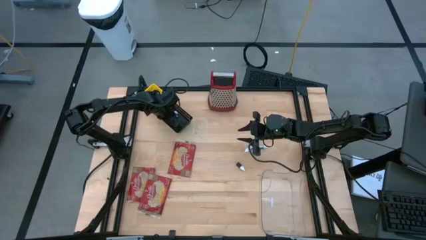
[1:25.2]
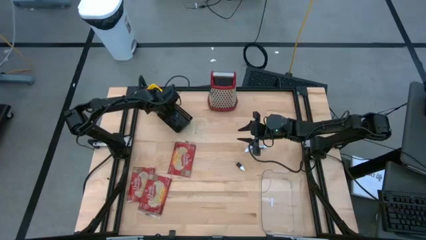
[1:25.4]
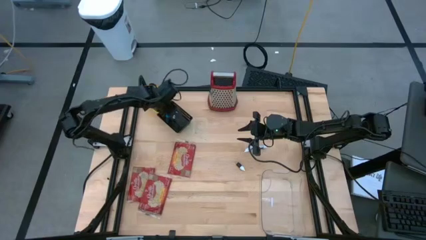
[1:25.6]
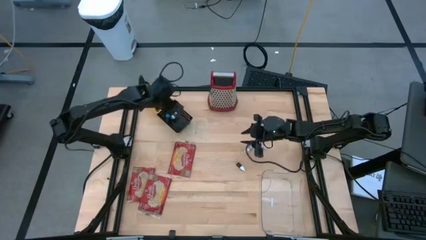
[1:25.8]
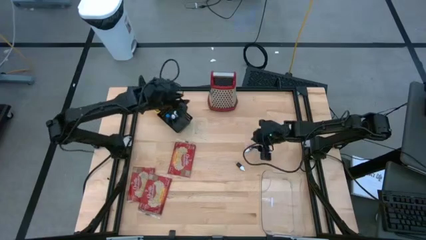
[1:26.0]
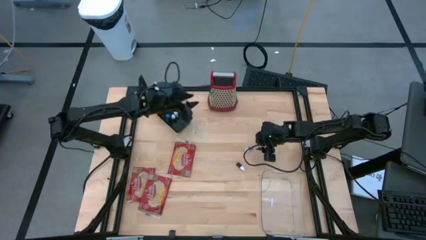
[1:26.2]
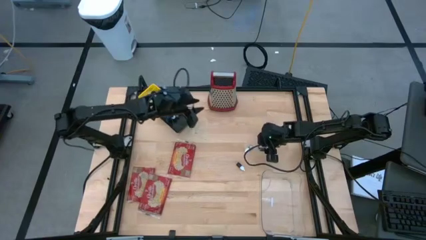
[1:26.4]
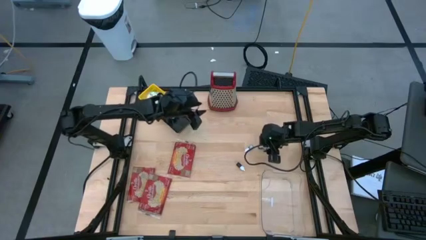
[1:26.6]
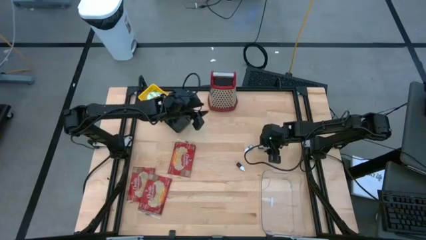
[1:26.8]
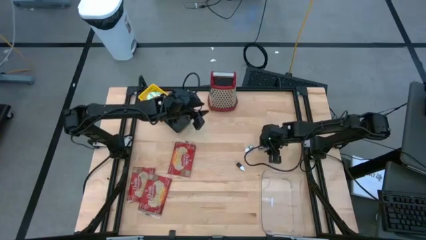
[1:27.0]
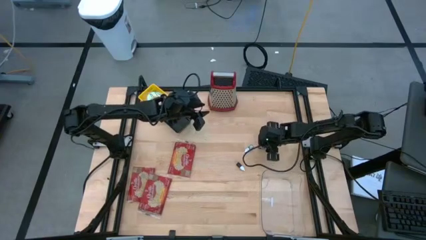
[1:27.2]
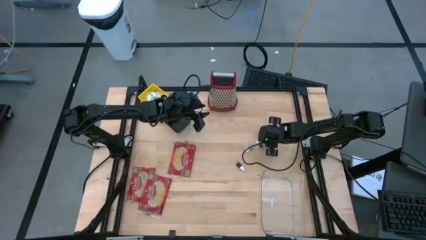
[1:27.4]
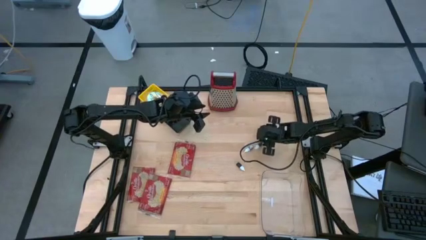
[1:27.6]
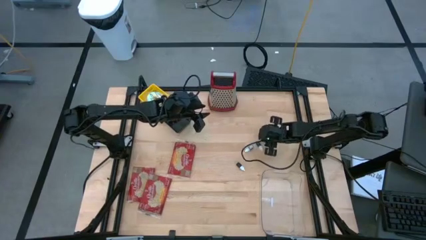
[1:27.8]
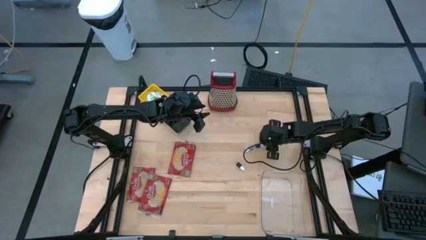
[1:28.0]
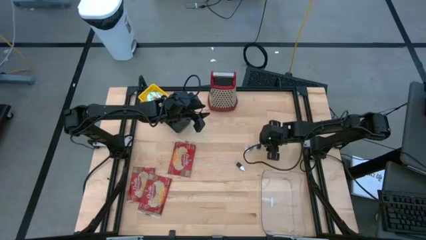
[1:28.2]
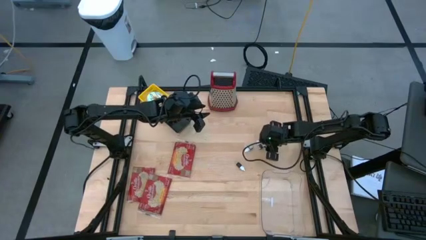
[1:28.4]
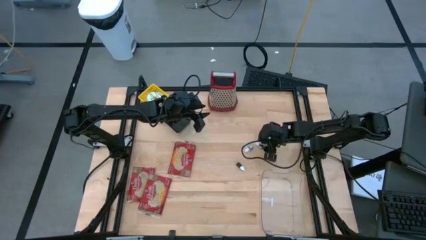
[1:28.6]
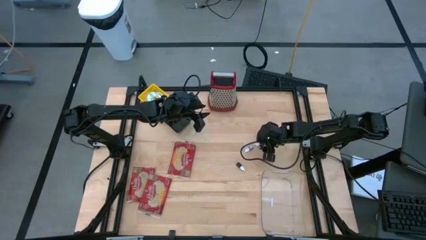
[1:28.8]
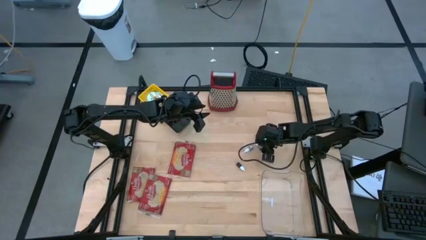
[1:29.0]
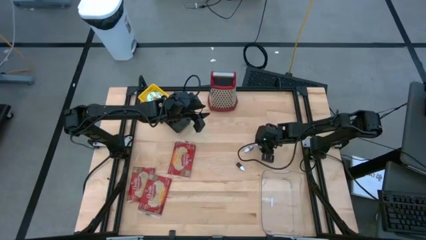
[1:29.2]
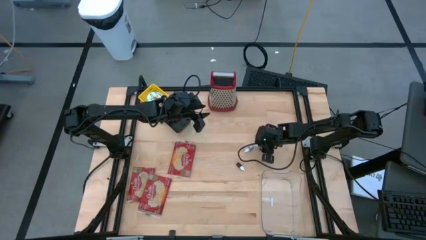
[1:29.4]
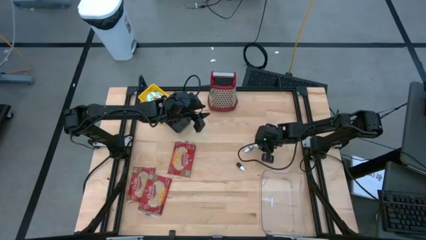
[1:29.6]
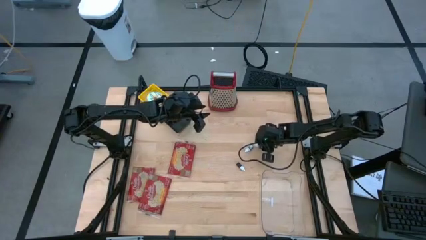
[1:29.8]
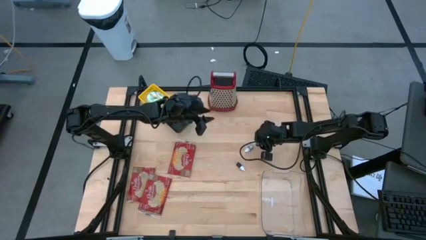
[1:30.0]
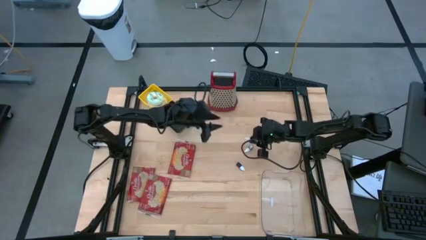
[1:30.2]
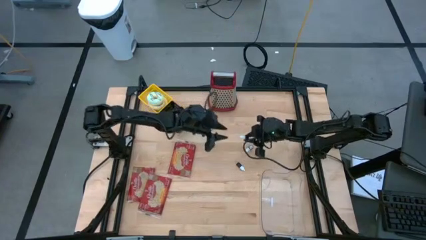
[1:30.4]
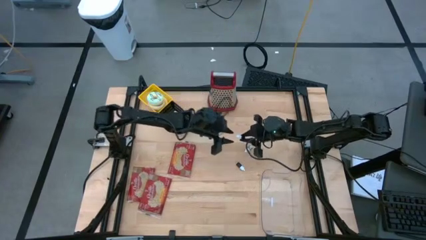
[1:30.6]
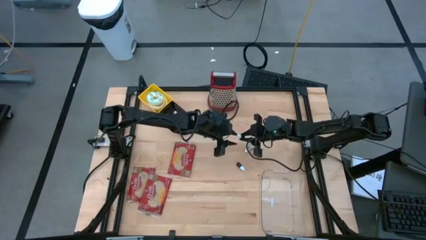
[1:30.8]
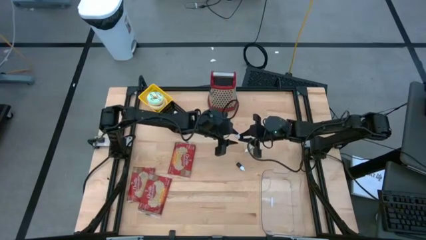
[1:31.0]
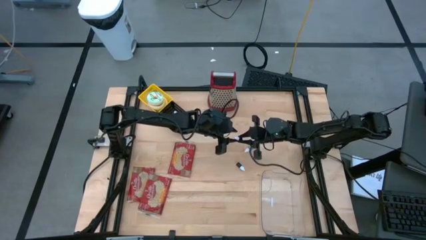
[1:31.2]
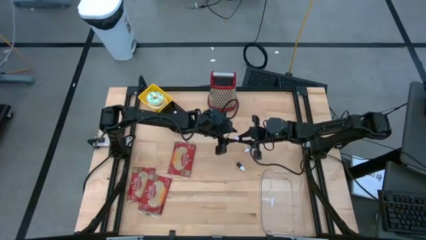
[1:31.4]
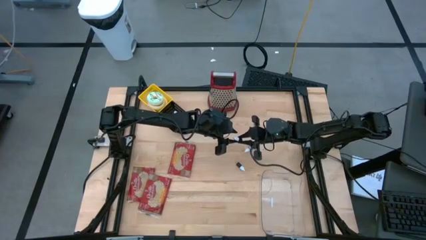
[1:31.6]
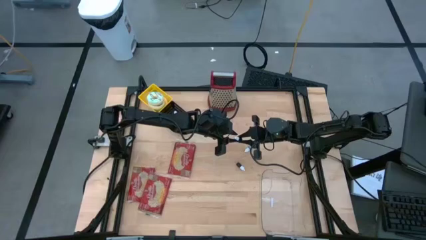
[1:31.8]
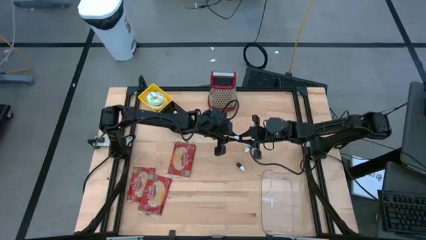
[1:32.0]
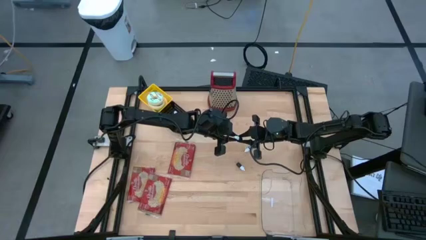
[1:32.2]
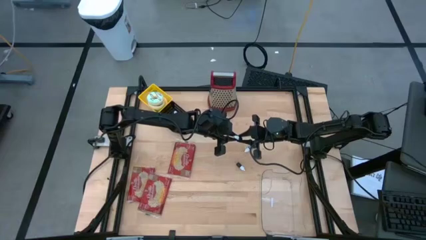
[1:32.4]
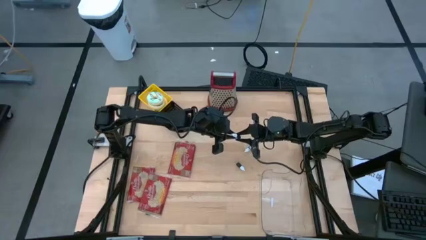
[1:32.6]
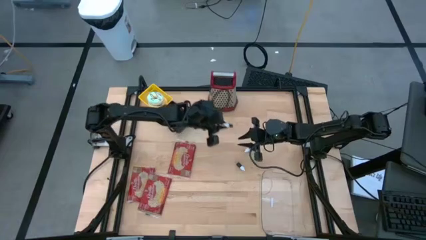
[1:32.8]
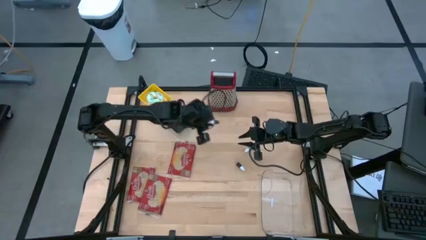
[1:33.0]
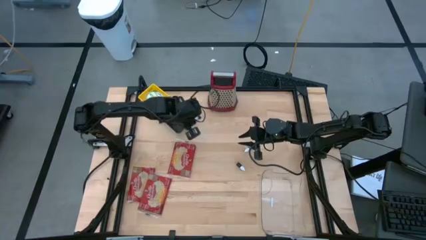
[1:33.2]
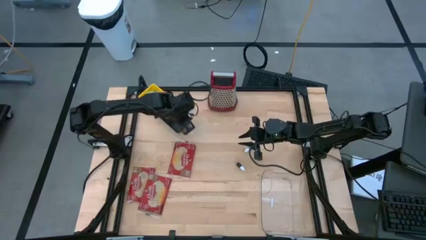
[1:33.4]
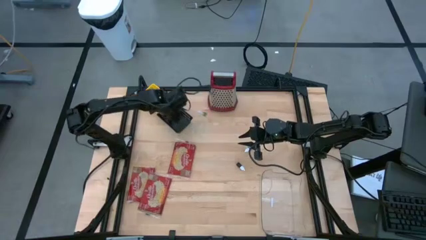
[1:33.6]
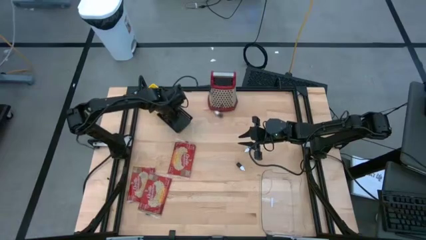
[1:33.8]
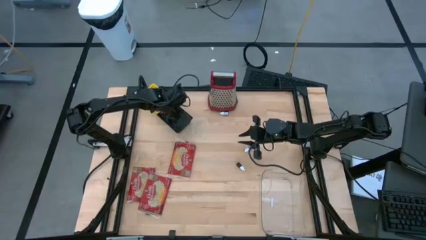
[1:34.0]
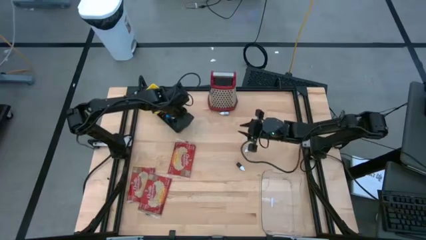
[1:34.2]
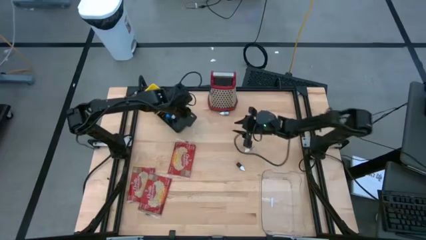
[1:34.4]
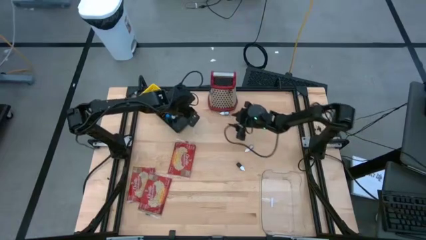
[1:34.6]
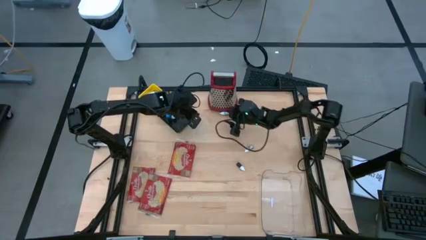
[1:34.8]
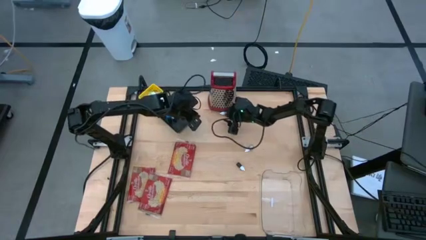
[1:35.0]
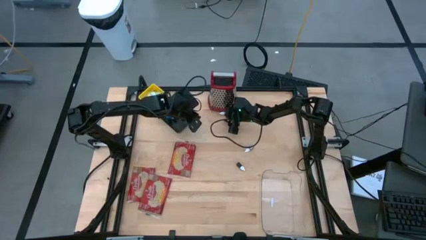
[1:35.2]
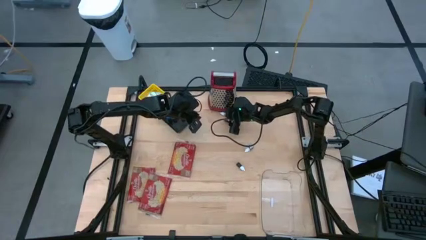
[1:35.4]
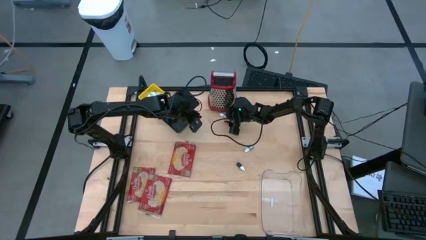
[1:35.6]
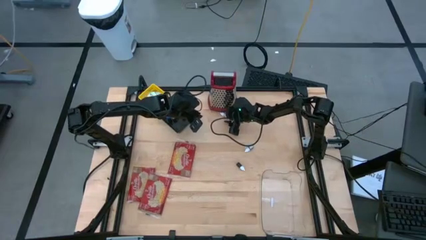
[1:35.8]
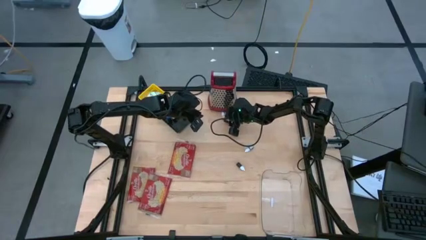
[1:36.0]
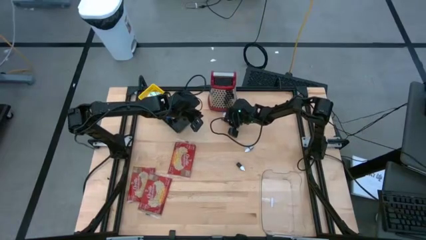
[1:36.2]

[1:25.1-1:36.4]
Put the top green food coloring bottle into the black bin

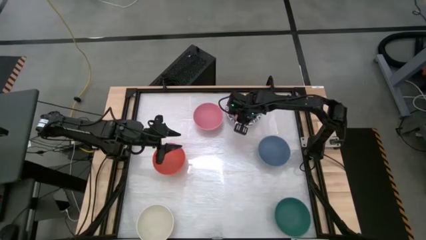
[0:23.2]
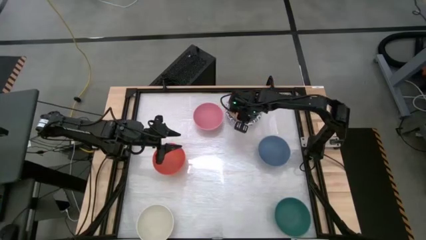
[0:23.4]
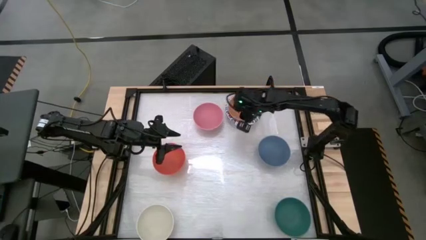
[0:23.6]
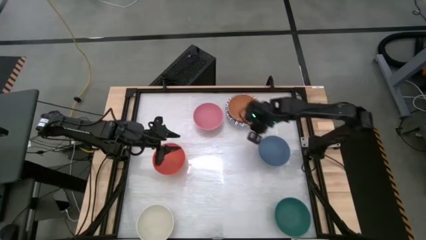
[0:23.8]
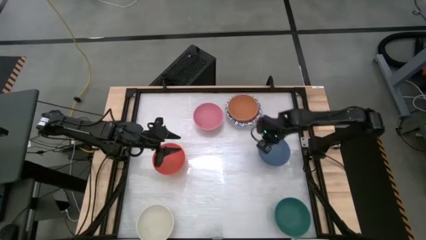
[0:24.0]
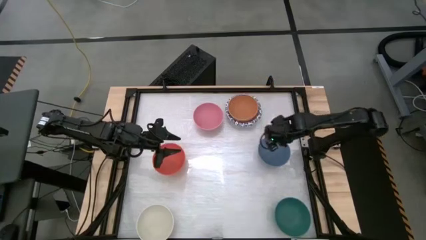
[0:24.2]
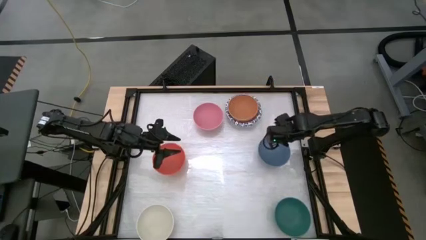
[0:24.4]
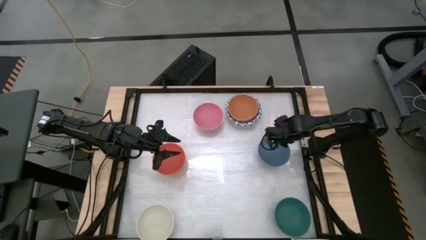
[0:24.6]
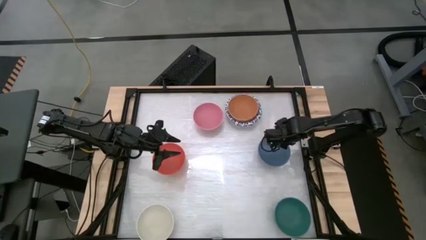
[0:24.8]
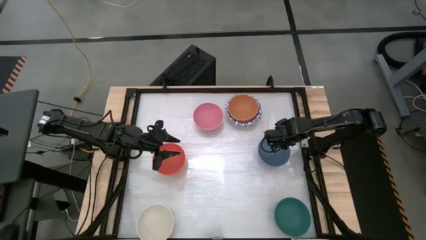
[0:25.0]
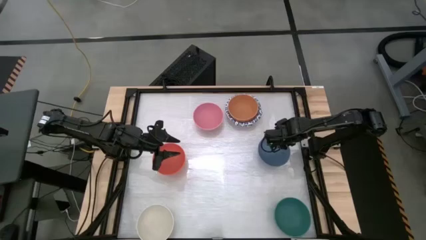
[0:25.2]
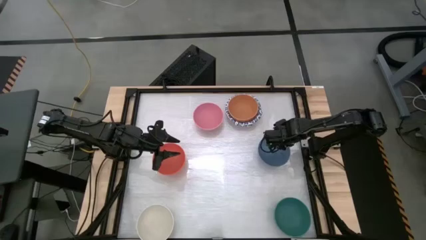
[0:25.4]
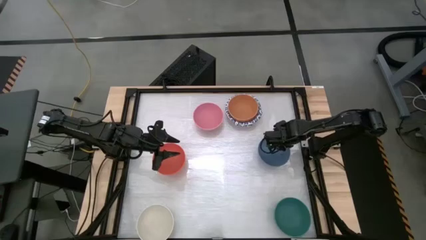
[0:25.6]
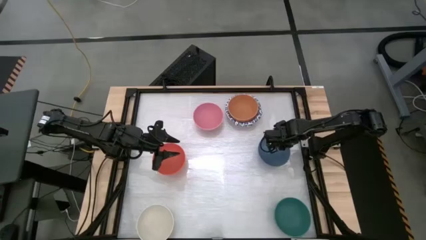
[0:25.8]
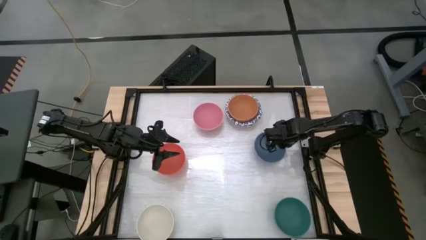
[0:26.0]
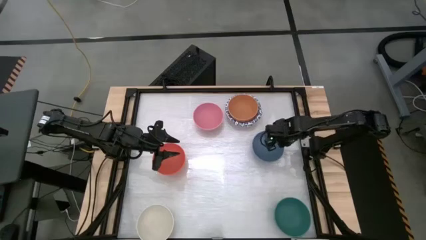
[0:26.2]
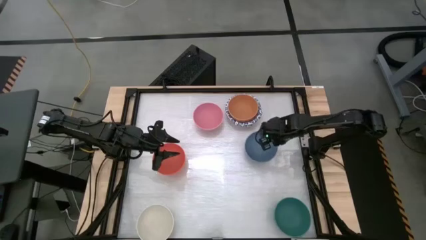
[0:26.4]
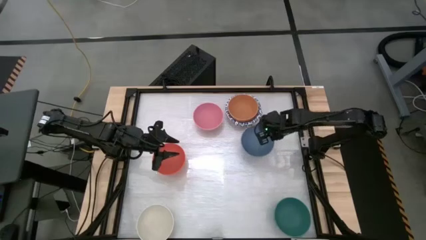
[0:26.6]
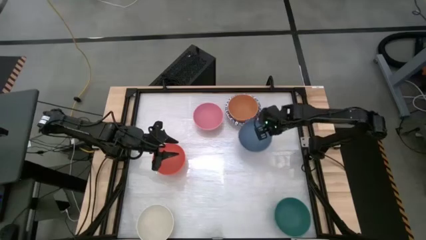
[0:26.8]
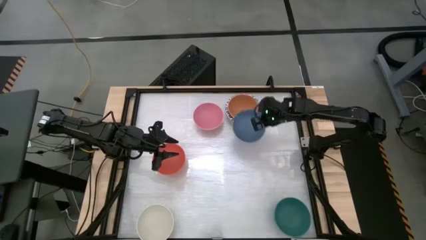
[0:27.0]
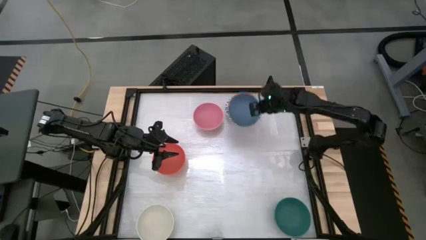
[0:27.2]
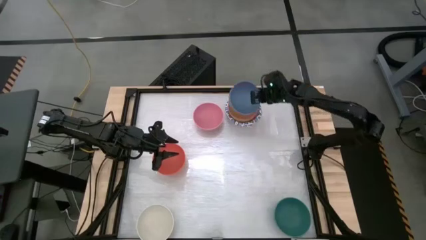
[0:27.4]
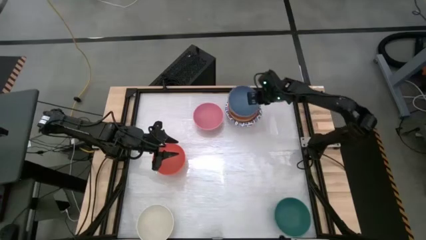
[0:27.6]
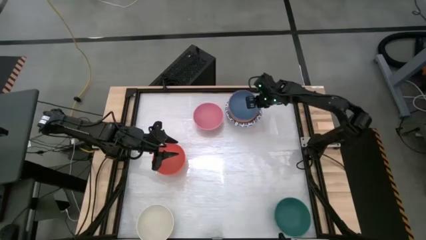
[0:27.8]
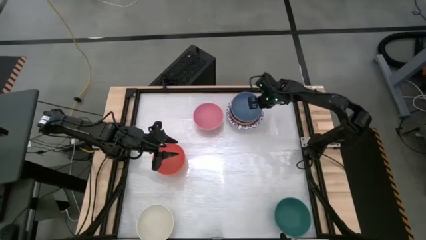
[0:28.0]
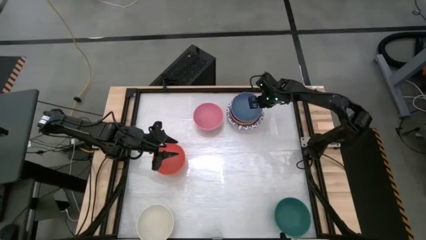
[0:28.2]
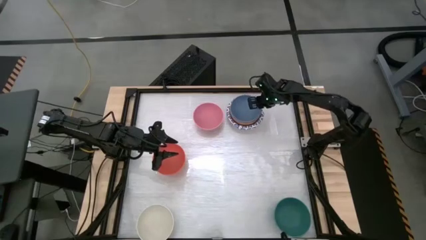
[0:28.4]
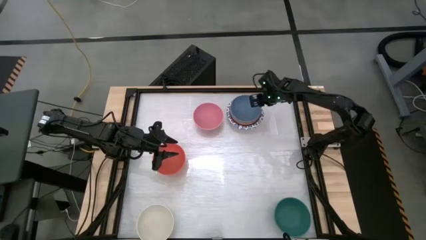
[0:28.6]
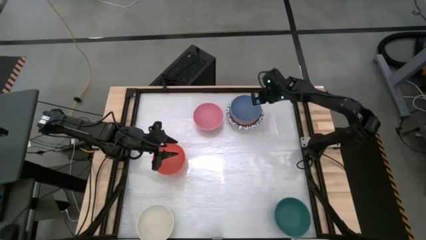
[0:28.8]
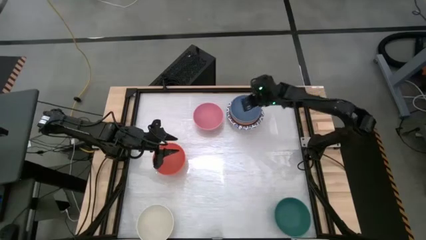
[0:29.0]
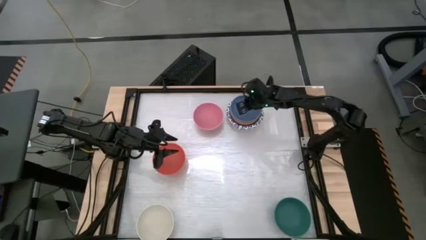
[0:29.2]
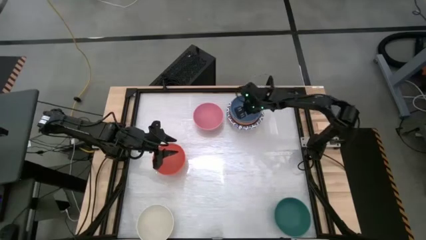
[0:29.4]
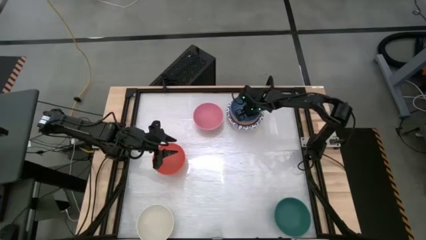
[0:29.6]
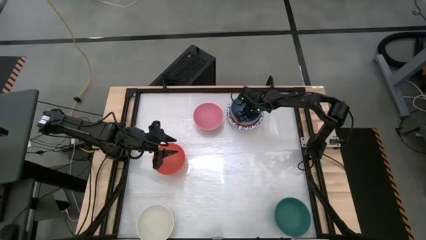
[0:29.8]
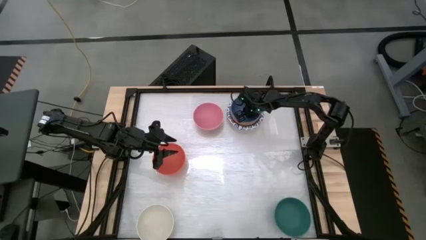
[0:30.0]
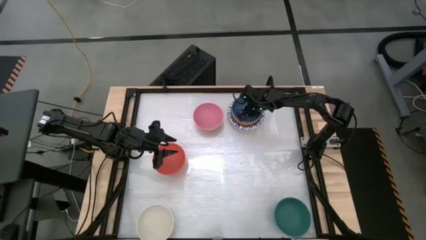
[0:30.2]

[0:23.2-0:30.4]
Stack the blue bowl into the light orange bowl
